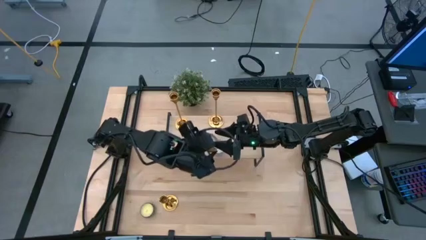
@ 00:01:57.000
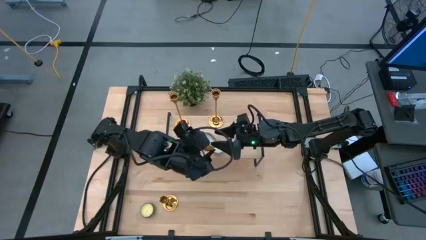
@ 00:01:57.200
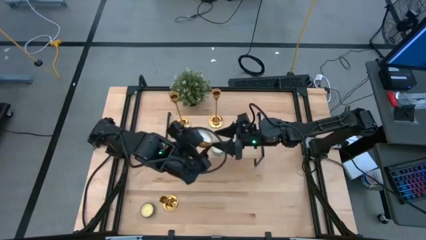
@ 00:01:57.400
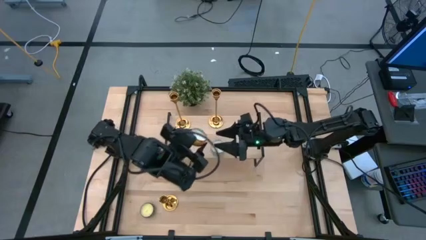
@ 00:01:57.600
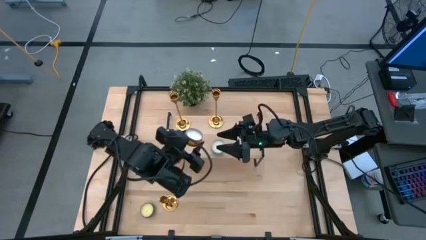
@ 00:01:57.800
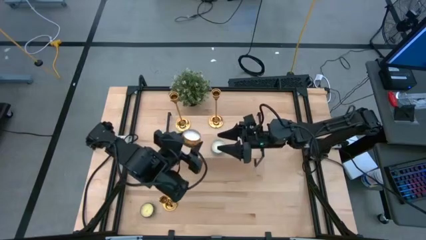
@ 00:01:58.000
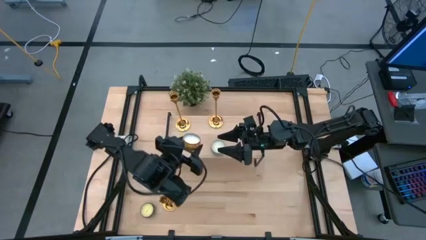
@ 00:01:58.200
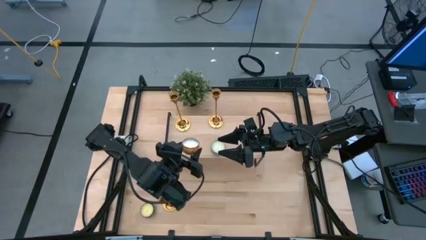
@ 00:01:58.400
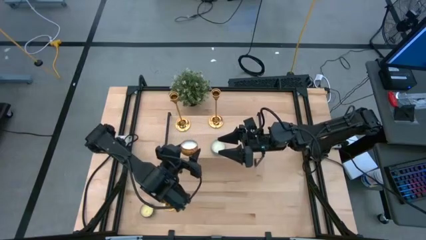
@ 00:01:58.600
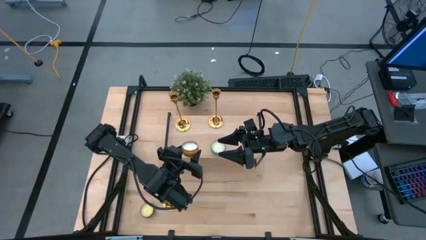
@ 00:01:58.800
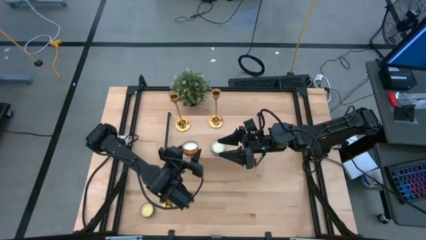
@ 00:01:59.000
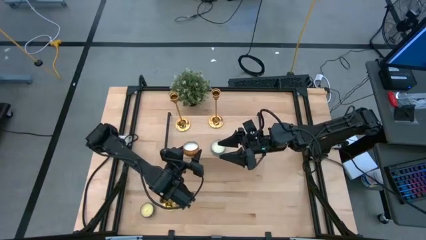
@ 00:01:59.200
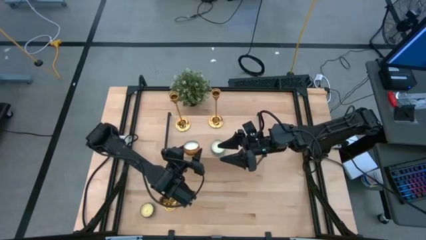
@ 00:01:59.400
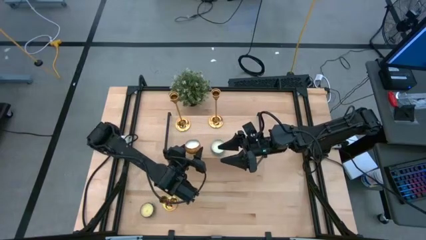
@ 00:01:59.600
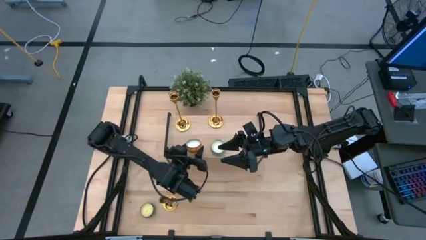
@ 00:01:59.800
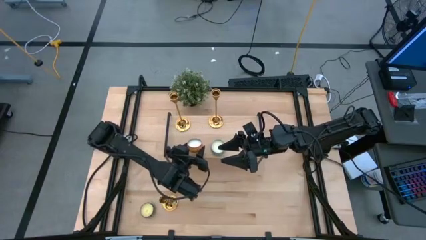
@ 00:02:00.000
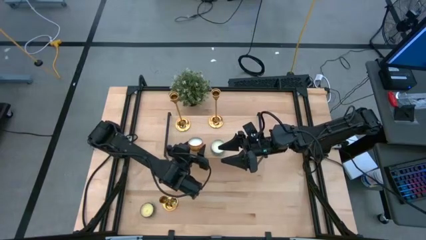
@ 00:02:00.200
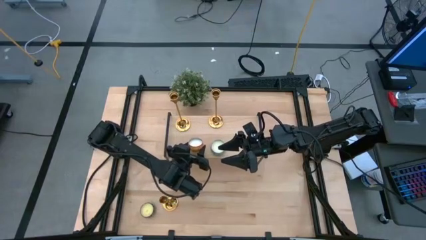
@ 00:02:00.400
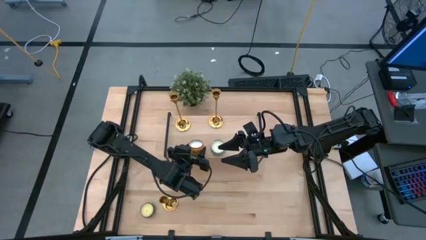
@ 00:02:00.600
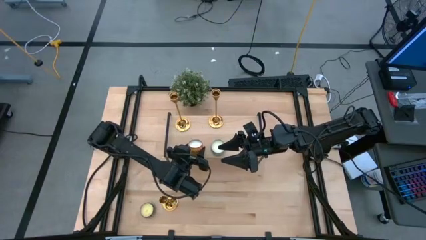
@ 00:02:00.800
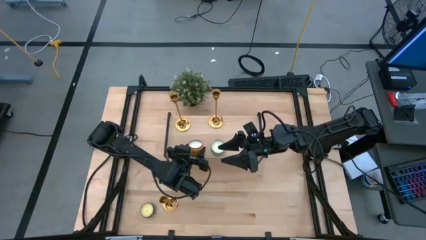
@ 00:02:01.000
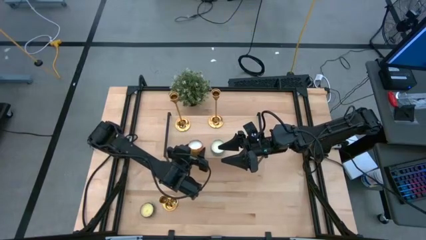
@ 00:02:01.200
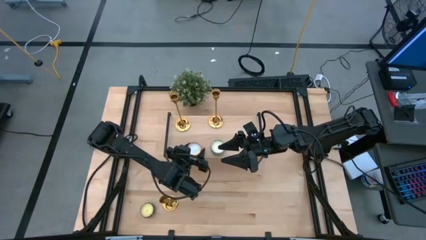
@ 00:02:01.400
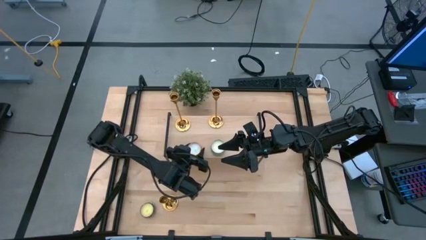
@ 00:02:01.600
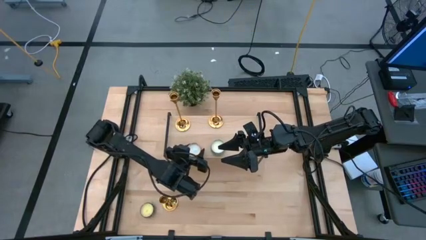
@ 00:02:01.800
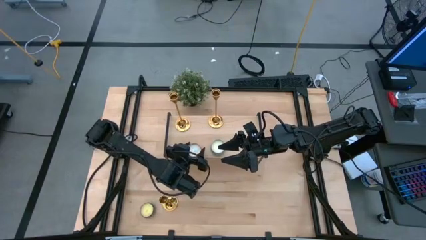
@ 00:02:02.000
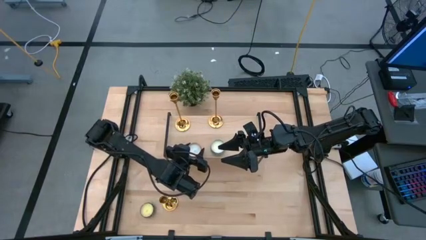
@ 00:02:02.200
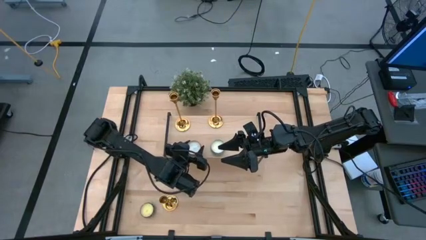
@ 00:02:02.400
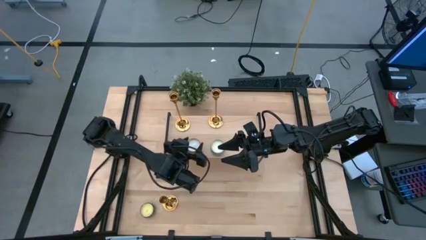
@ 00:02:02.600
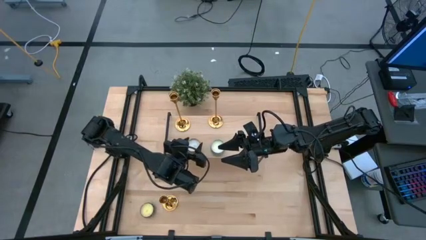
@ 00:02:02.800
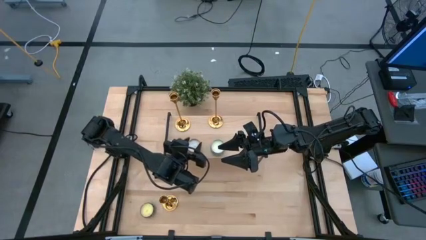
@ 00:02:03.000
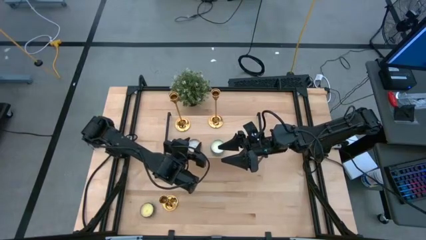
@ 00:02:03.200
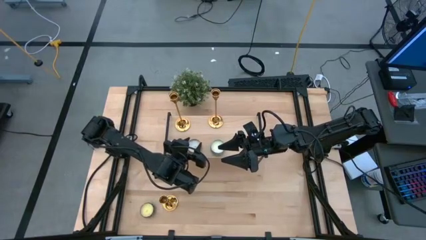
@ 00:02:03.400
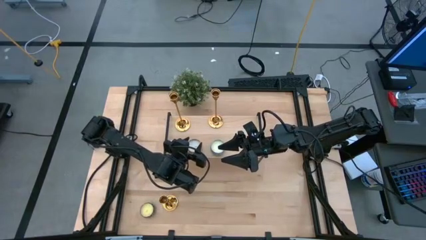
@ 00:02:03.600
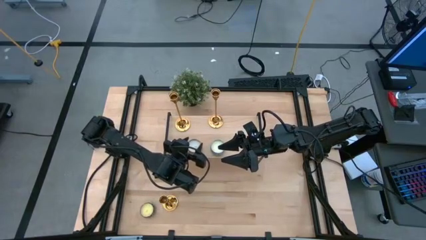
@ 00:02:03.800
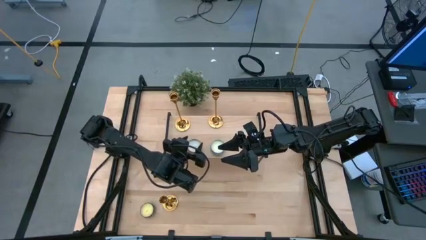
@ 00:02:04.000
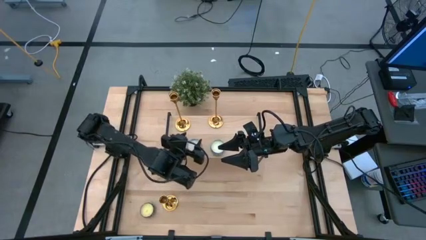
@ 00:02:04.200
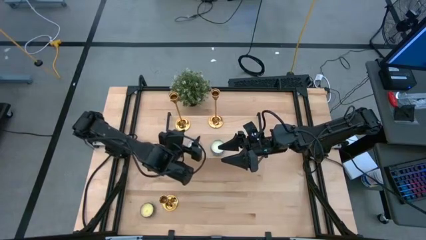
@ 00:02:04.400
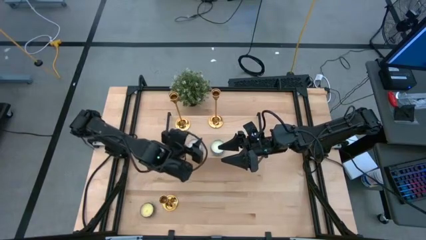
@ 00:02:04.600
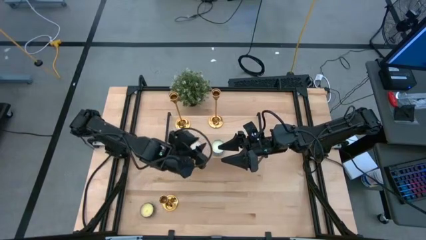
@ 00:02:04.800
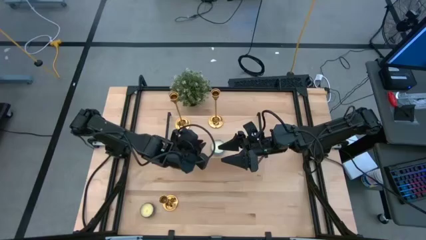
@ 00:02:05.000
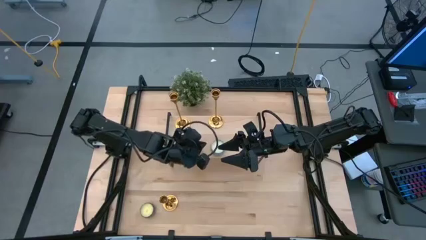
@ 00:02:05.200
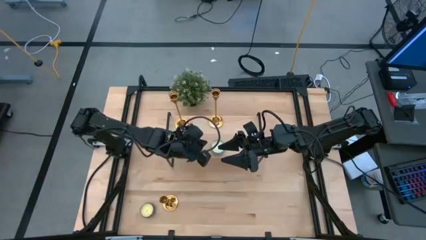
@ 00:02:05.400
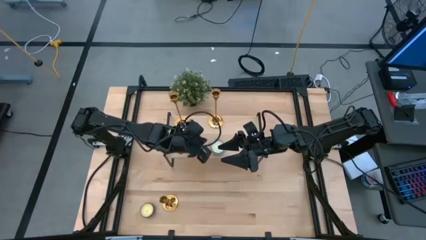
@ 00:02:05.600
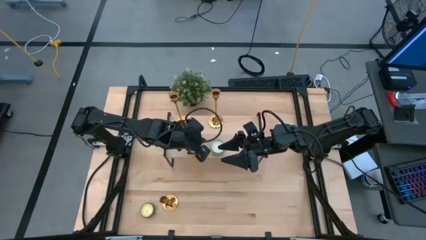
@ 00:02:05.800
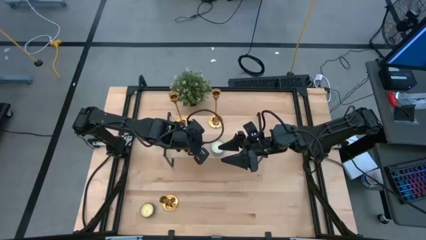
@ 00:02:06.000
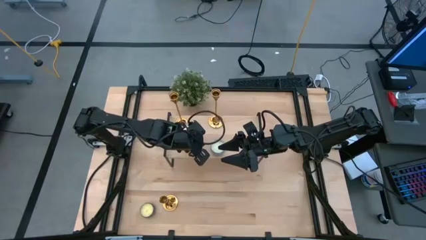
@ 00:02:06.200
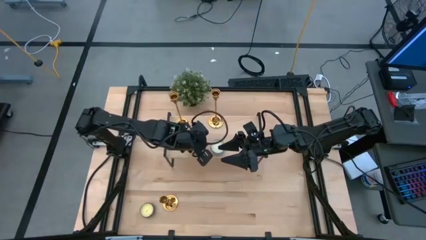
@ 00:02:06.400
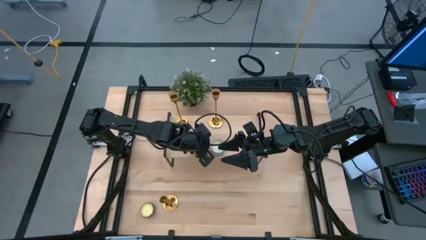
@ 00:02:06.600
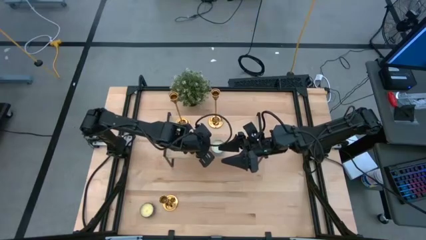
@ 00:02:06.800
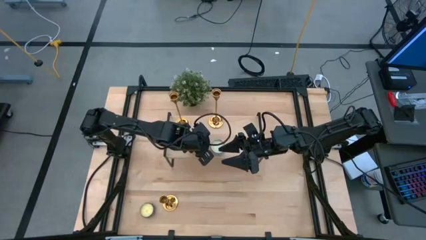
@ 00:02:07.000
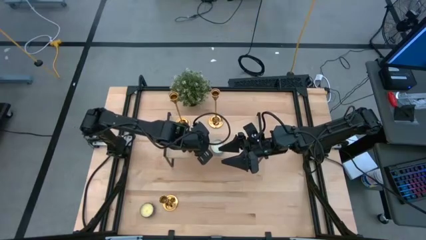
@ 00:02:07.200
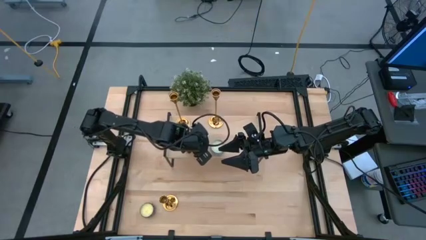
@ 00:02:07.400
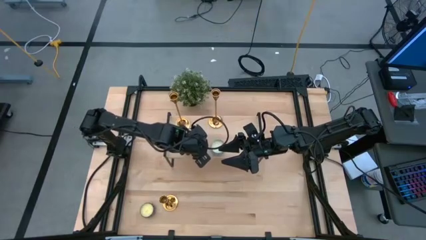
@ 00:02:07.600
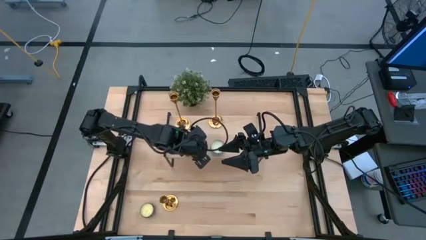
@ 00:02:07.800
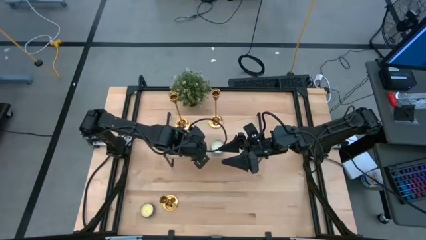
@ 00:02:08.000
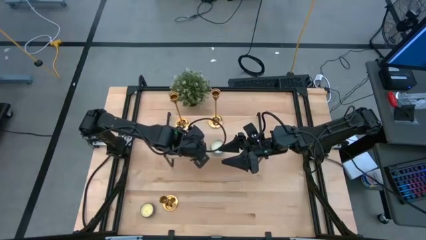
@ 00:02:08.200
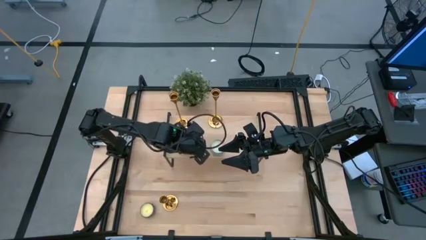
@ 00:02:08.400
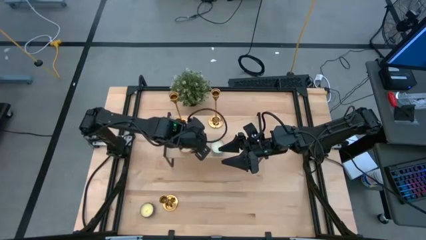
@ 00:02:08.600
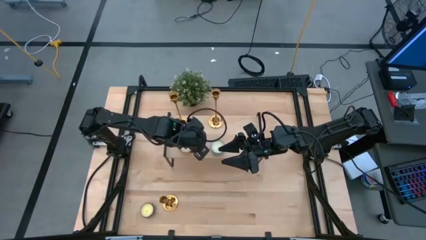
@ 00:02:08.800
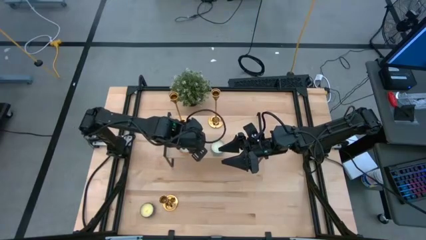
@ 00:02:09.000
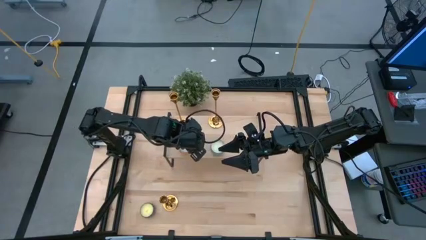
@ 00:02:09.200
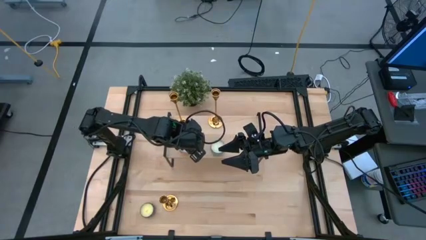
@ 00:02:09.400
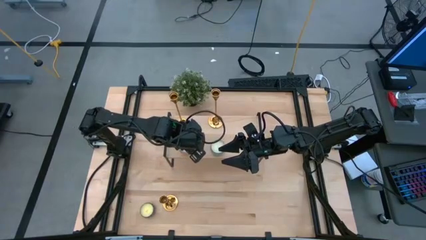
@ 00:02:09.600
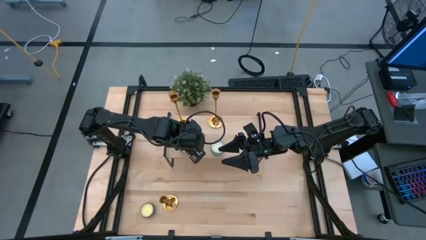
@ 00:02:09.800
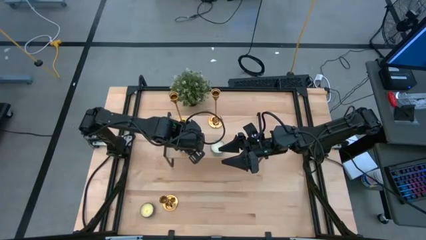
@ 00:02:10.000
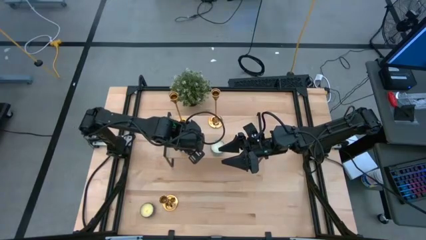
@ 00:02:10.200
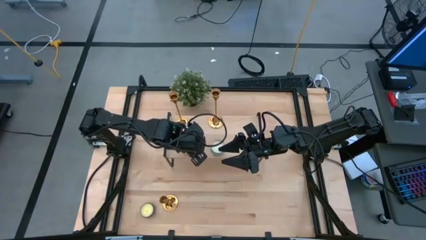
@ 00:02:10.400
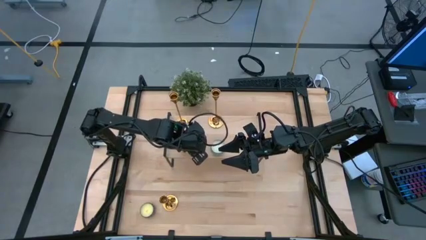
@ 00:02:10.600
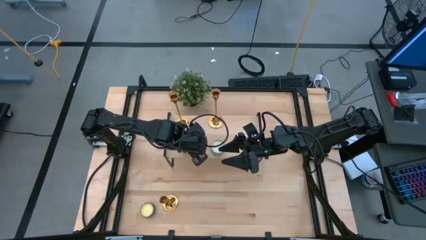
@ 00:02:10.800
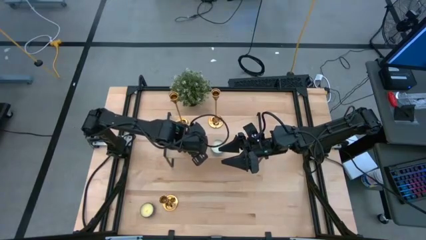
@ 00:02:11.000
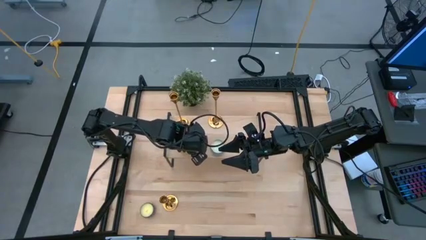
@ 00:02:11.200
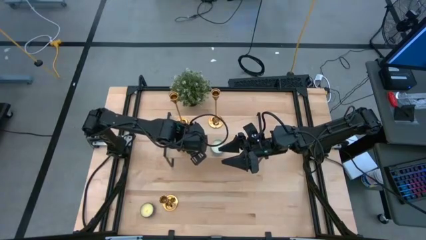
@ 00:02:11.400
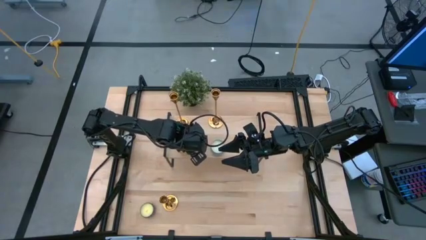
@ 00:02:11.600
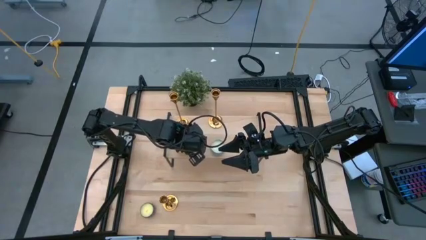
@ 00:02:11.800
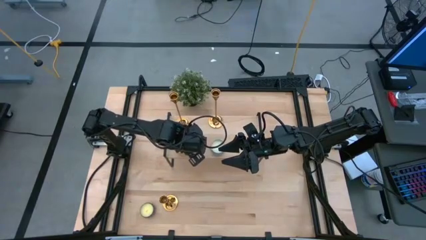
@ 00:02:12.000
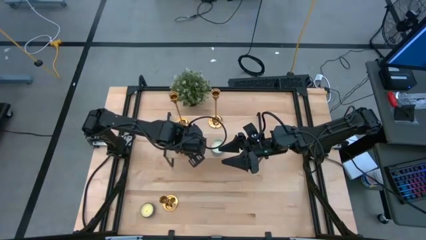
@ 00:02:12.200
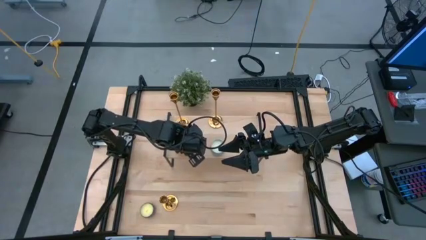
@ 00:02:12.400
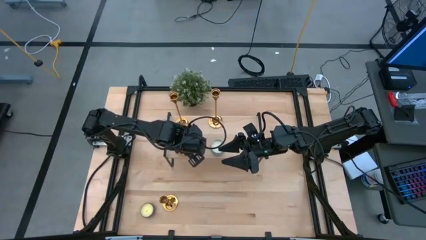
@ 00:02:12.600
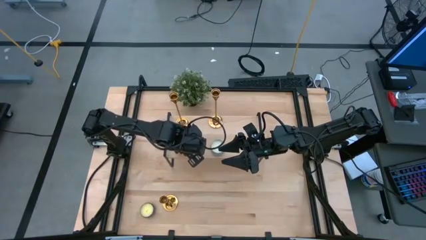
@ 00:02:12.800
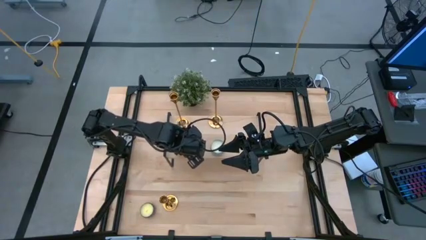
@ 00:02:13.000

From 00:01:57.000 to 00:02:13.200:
Task: Stock candles and holders on shelf
Align the orange scented candle with the other scented candle on the shelf
